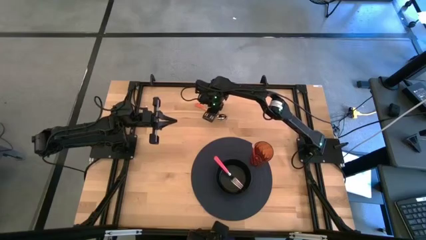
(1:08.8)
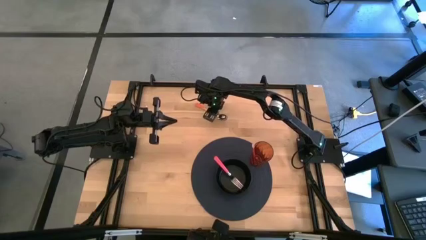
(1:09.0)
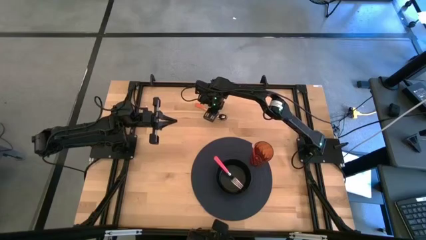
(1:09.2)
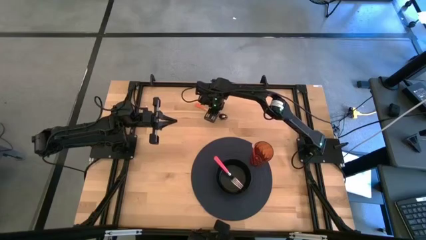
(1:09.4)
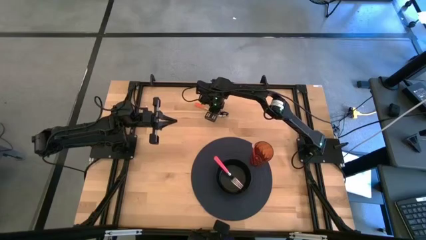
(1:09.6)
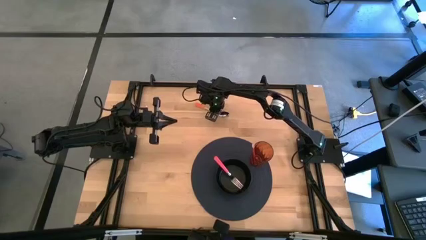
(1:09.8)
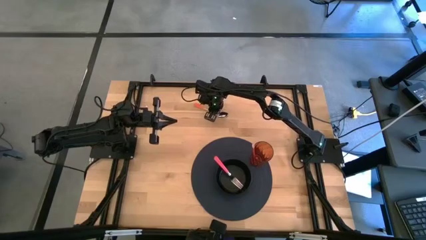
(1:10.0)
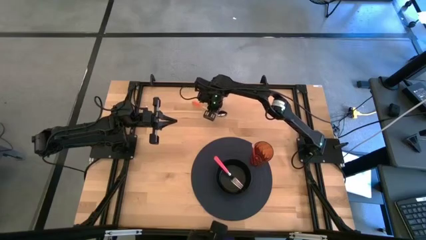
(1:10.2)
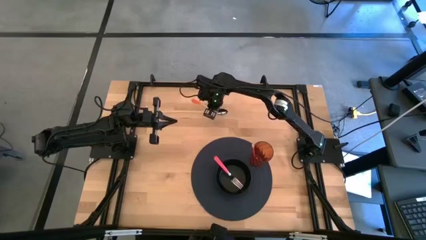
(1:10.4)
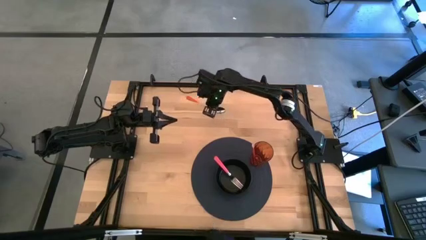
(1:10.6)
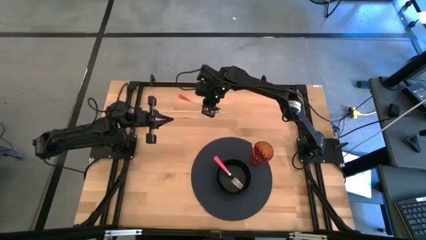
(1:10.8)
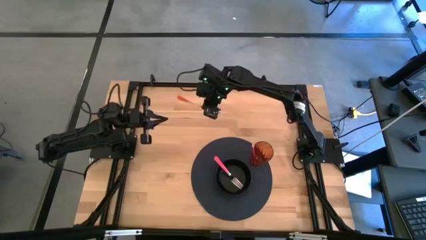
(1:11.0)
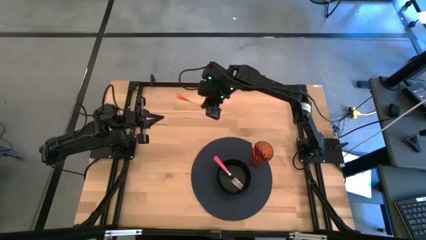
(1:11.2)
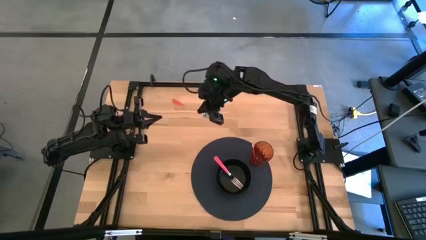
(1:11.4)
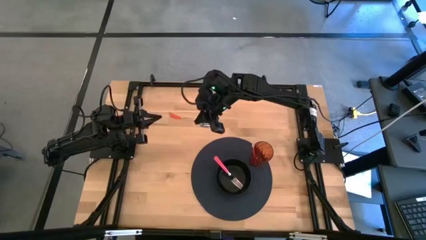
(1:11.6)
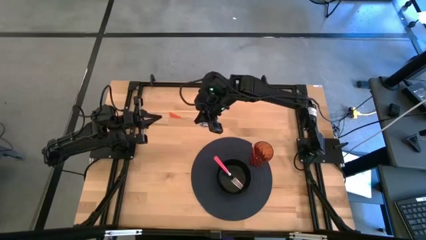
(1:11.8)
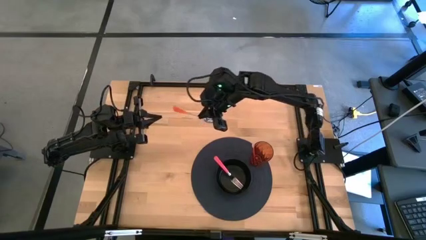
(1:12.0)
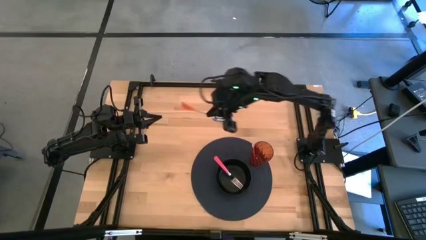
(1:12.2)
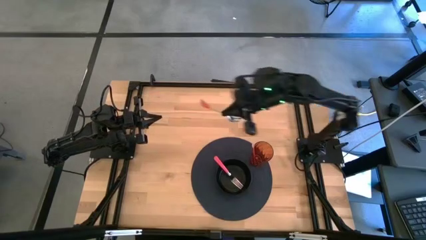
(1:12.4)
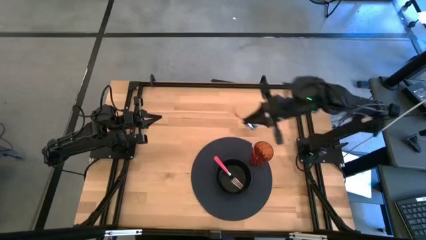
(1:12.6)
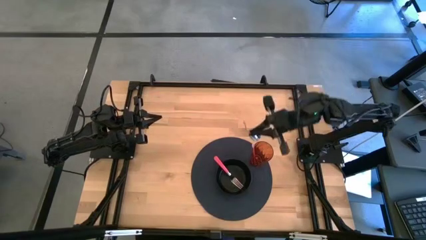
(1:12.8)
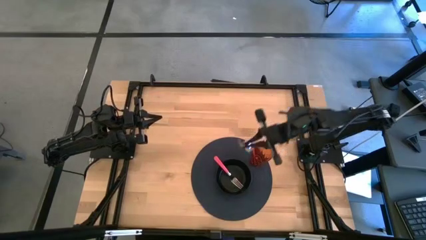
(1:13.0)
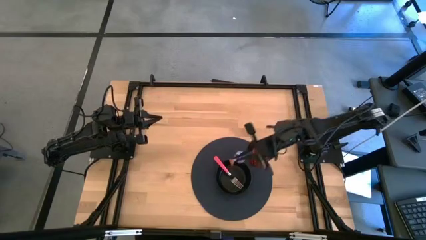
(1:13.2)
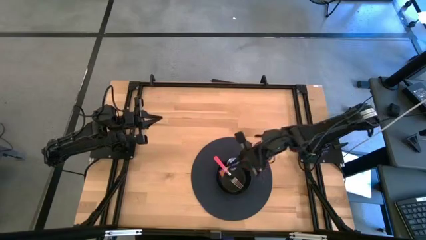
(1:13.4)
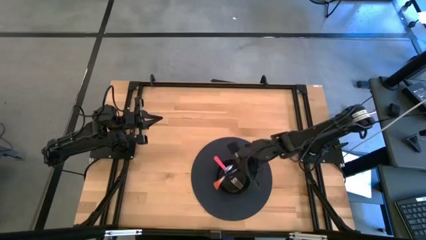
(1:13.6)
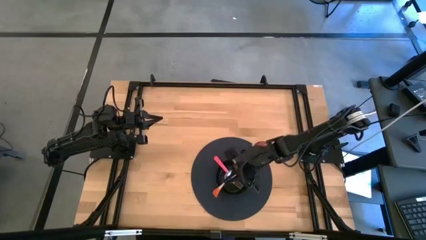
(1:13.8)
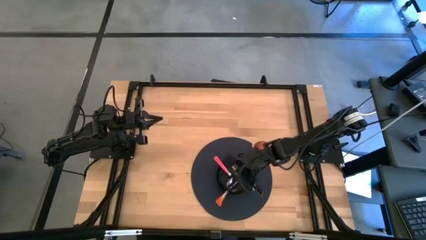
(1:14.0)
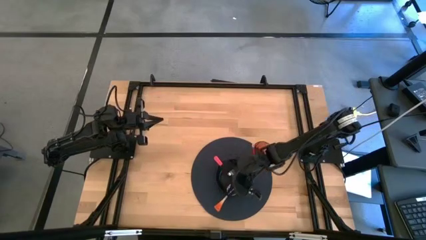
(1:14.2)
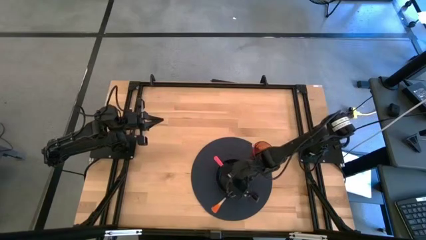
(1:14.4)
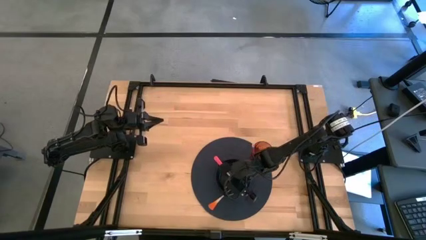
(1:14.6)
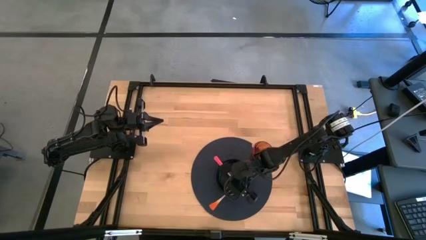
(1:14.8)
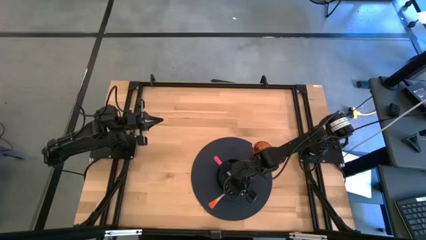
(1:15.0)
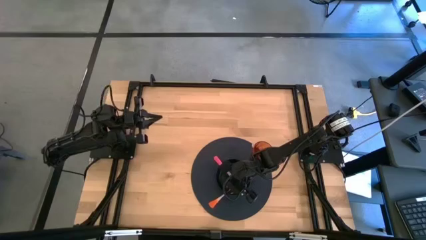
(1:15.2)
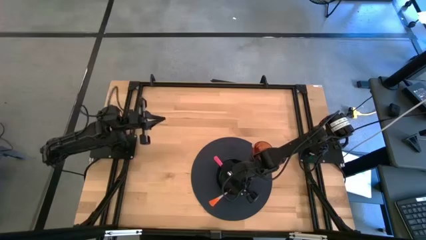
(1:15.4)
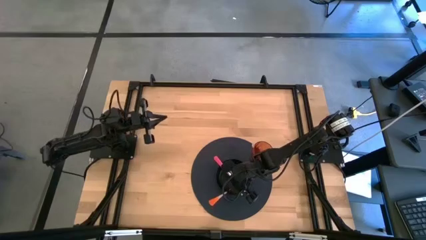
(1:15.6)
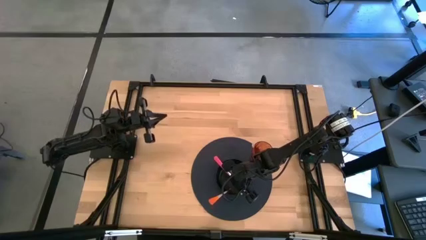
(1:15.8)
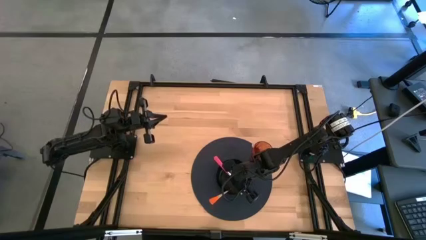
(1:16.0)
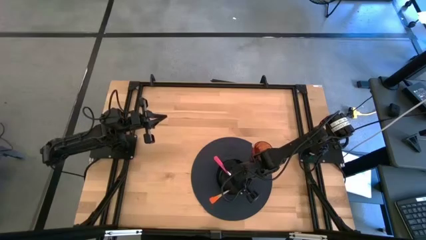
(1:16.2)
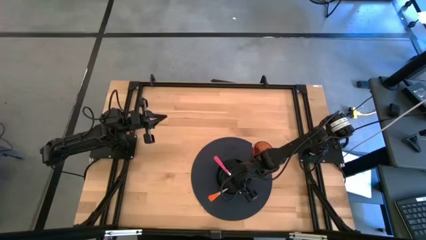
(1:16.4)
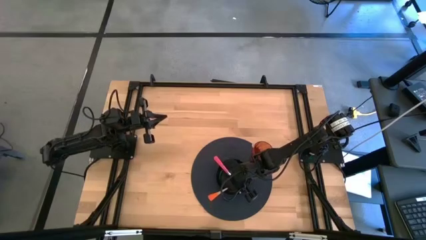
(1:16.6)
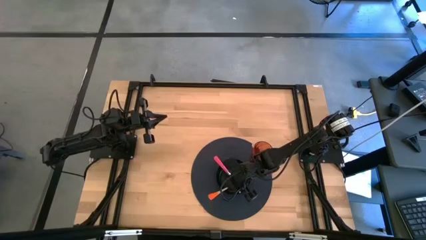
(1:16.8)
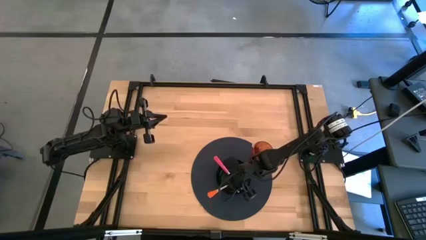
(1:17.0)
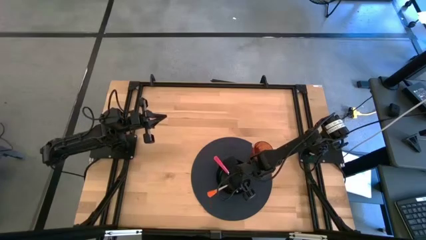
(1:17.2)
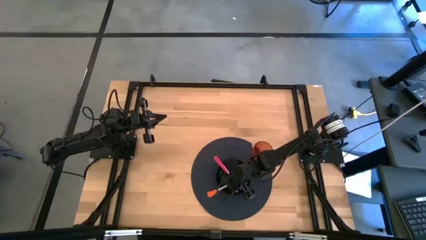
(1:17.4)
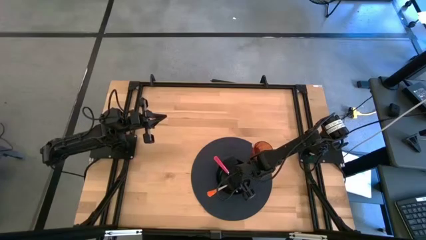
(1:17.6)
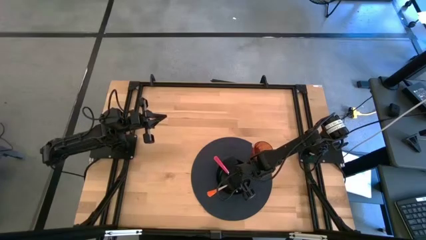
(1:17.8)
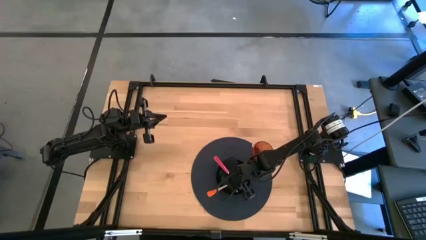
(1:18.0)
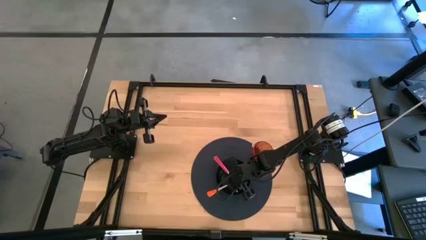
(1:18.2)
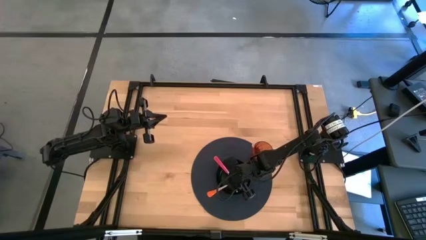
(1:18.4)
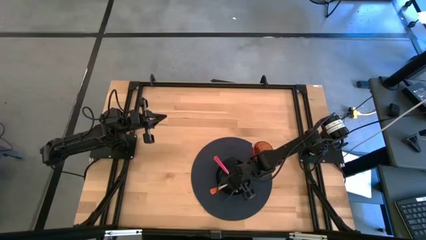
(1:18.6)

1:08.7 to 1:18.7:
Task: Pick & Place Utensil
Put the orange spoon into the black bowl on the black placemat

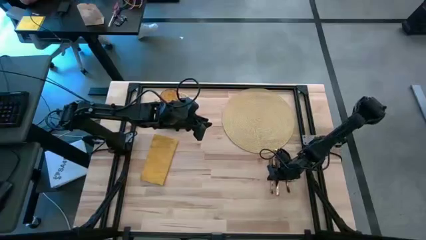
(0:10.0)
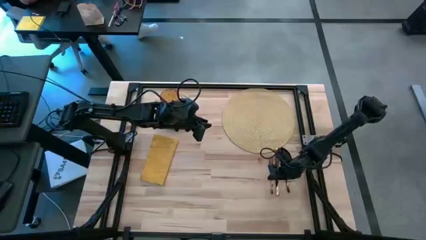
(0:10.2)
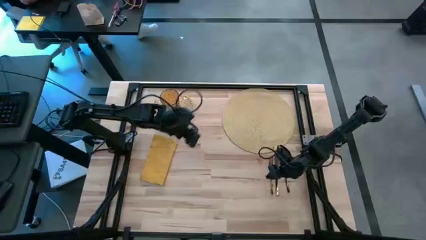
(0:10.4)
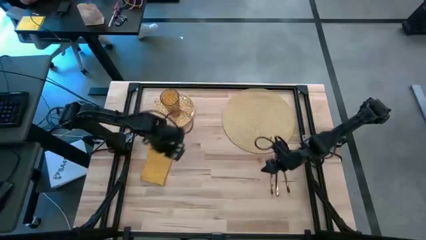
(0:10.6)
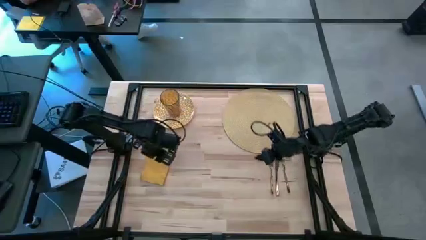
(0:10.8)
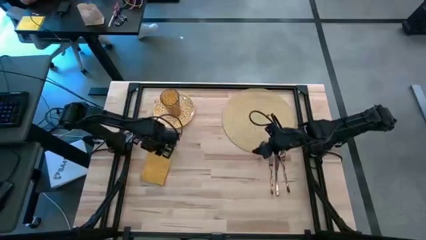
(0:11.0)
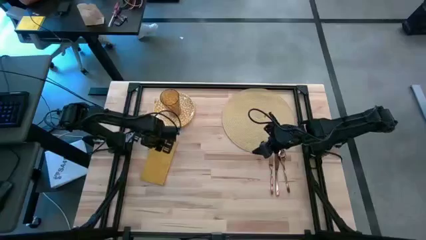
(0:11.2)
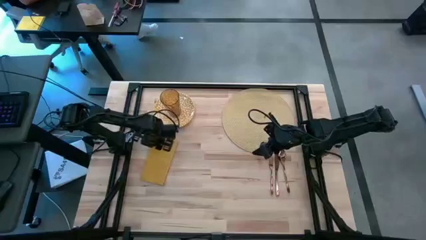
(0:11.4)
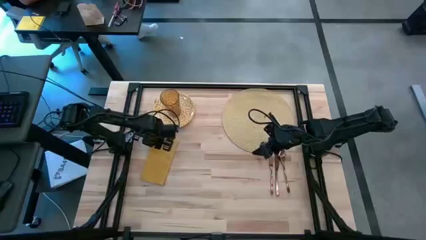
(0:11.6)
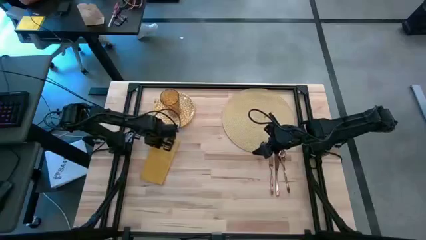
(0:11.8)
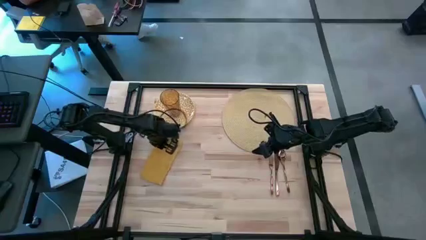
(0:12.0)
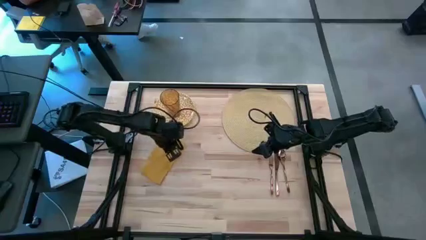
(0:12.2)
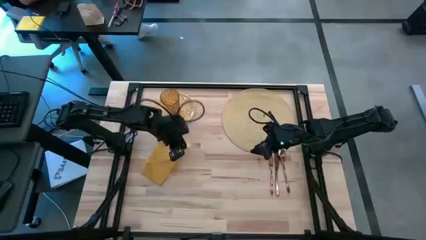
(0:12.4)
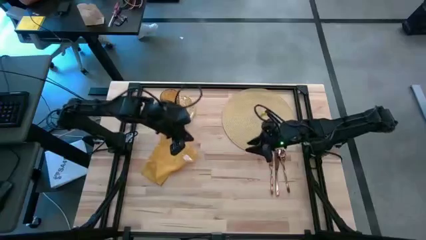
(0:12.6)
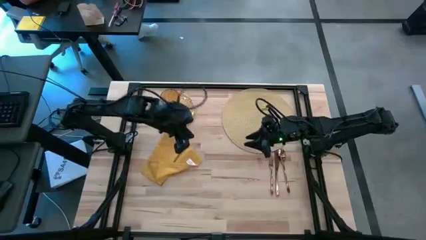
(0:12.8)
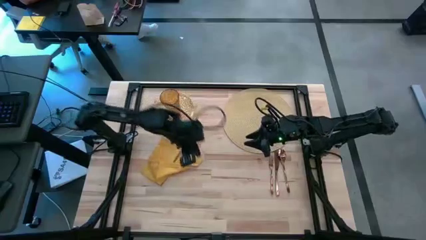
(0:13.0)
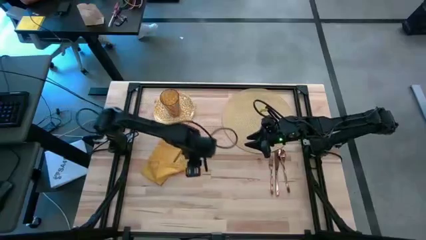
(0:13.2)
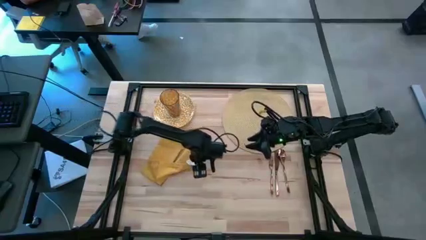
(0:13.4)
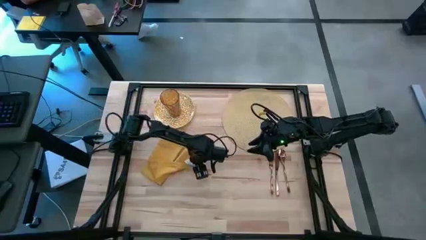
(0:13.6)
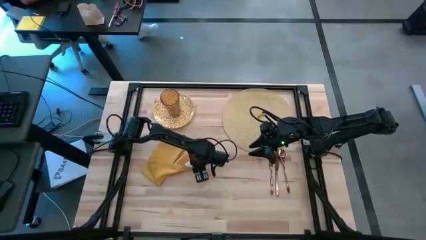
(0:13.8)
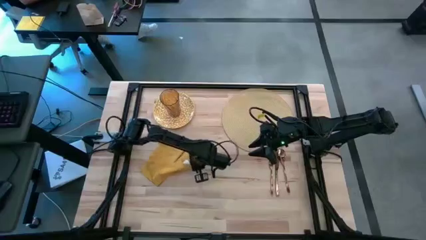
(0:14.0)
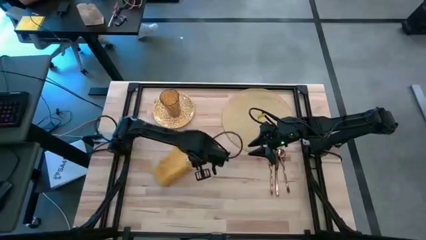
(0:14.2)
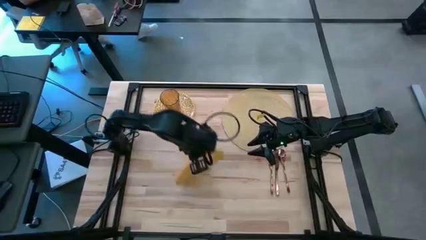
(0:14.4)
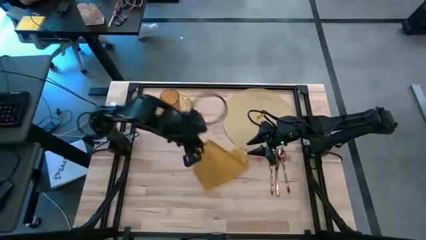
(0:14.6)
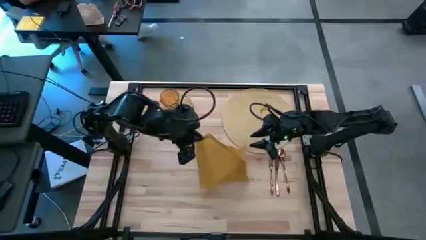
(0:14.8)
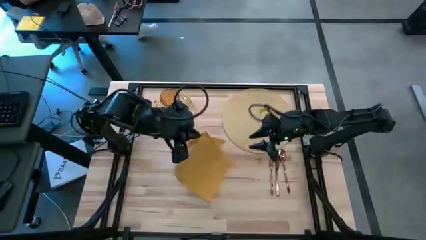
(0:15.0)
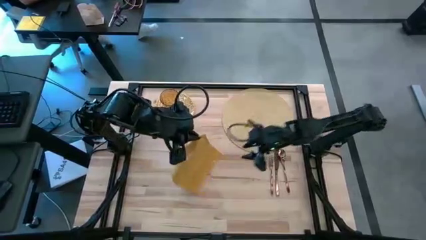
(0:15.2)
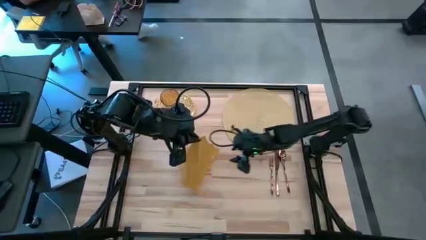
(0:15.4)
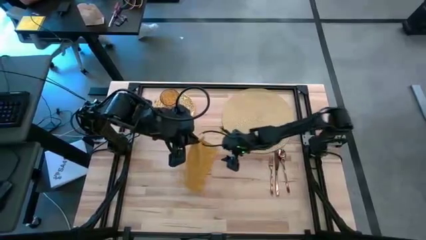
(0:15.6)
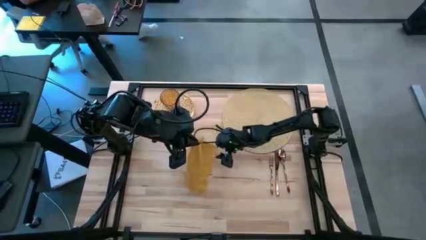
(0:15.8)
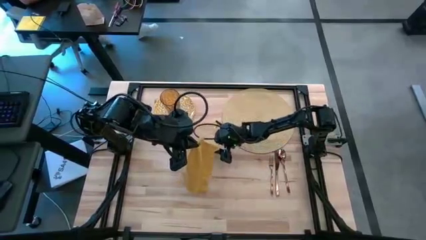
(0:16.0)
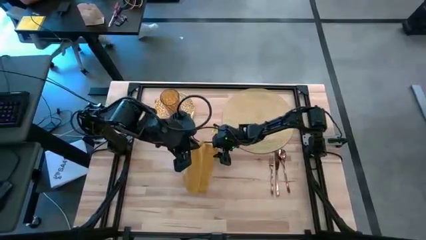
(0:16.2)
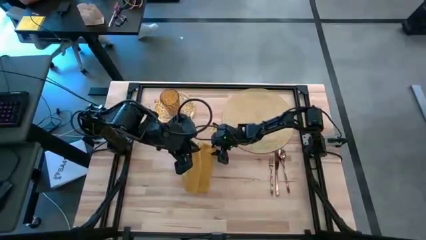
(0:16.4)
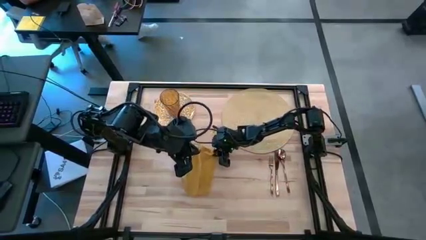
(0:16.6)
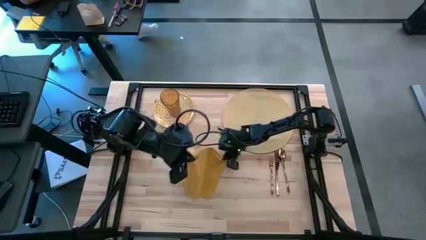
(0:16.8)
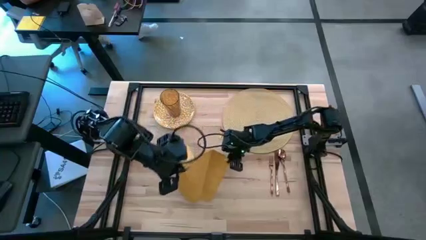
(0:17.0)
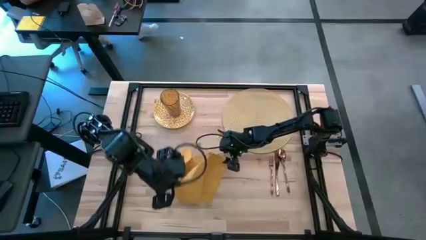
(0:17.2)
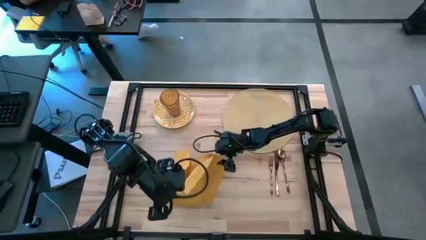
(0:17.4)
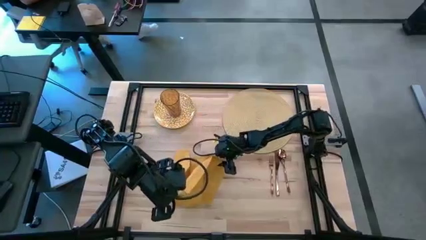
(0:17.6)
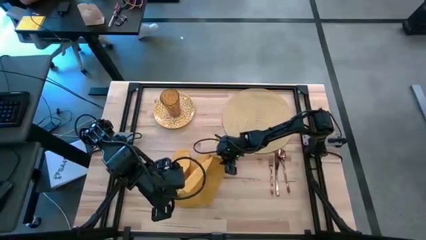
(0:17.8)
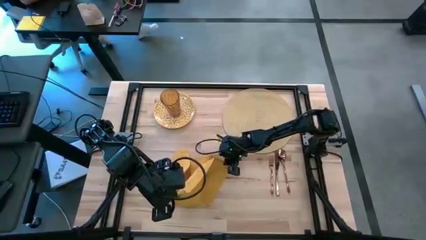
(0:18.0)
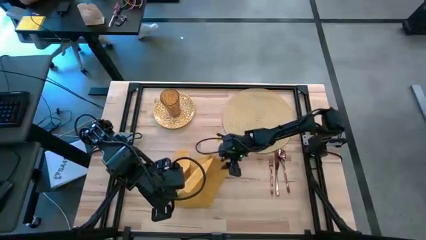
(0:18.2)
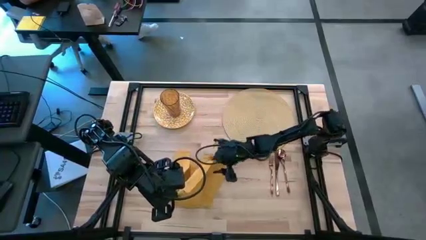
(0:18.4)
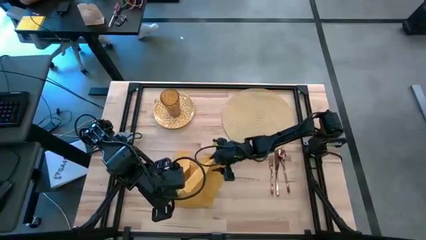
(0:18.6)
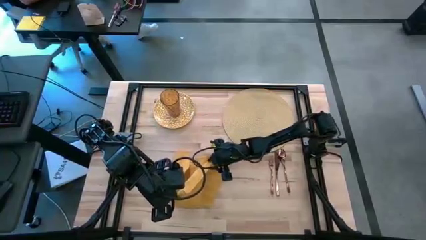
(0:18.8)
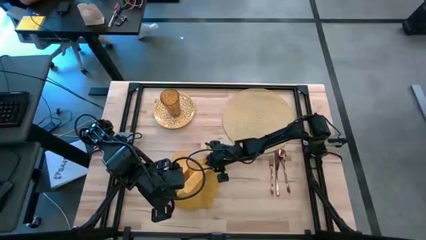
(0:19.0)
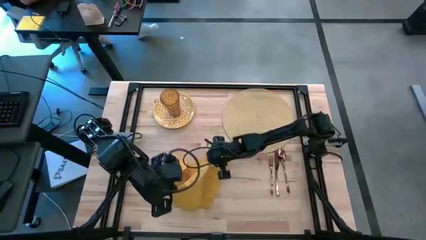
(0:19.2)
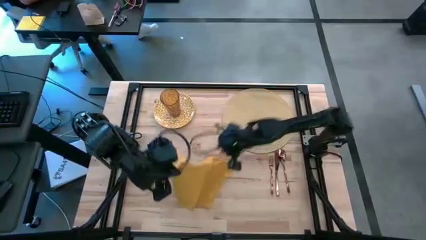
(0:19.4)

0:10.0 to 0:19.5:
Task: Set table place
Fold the yellow table napkin
